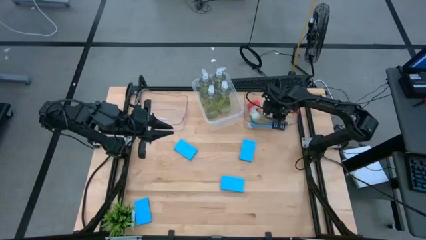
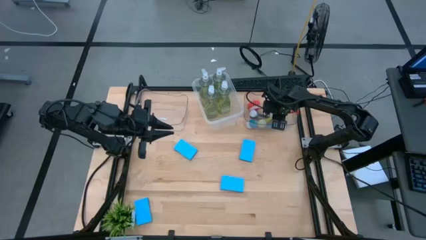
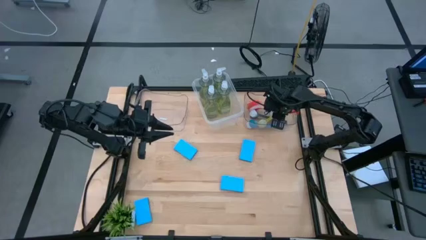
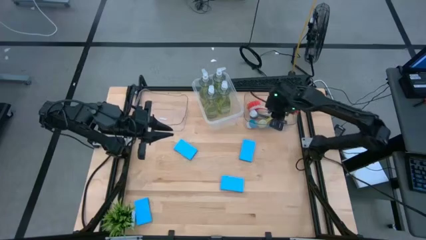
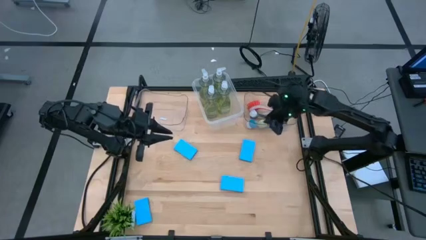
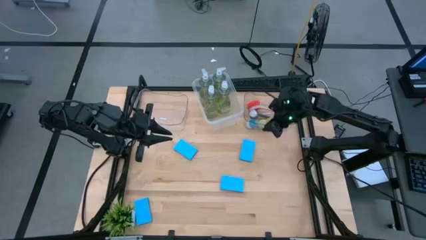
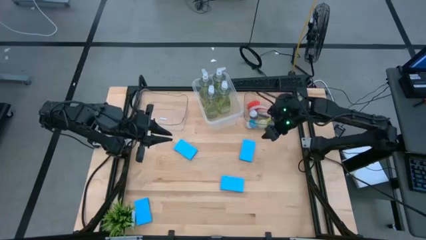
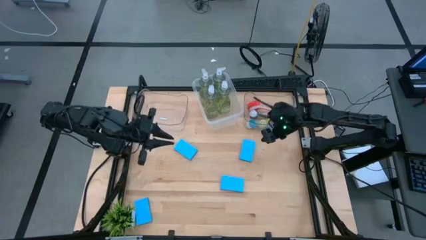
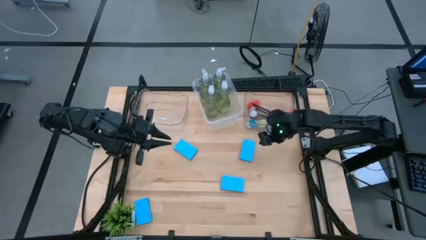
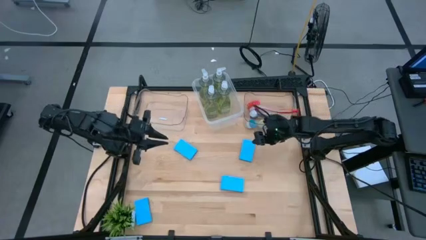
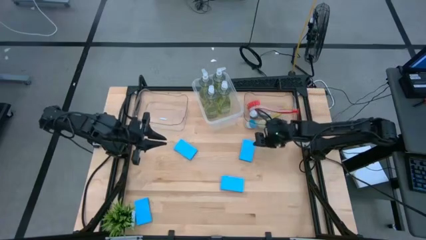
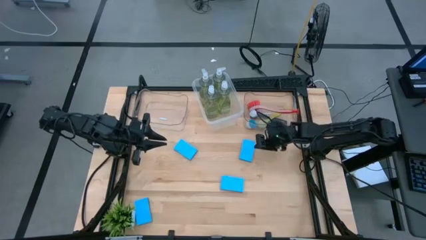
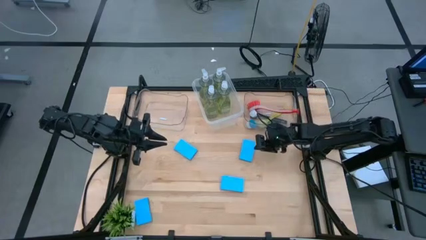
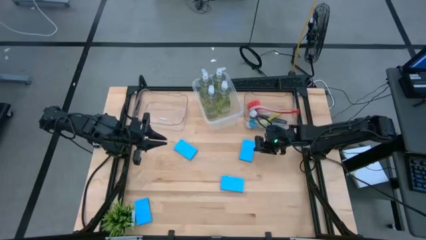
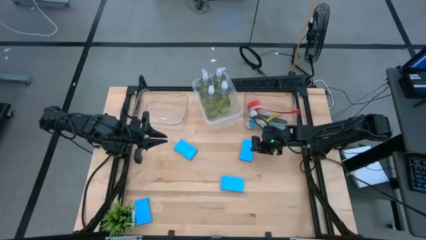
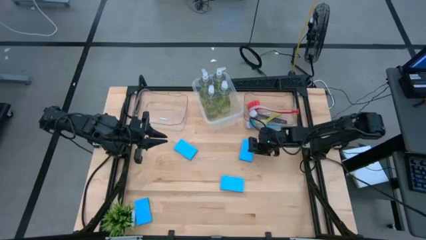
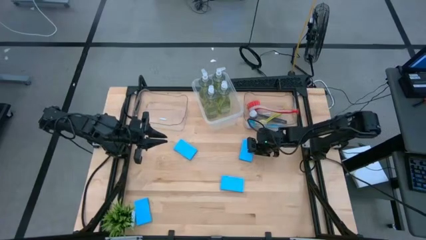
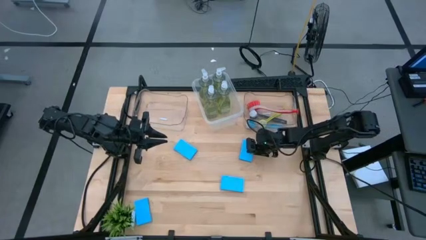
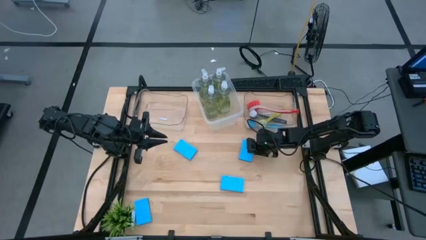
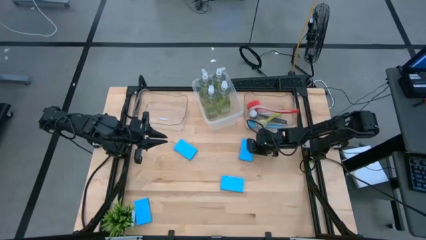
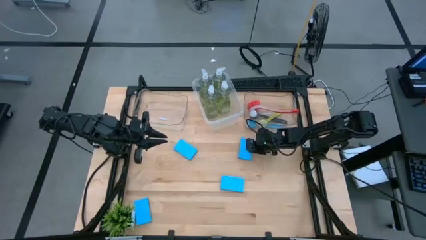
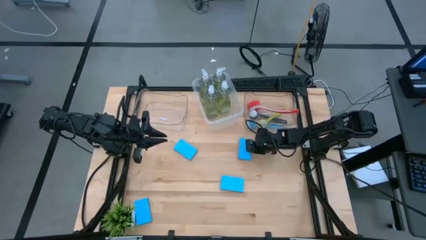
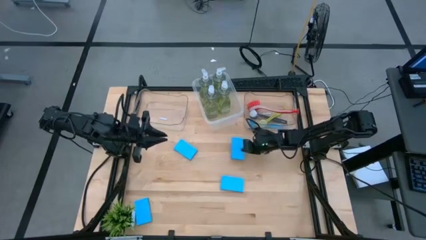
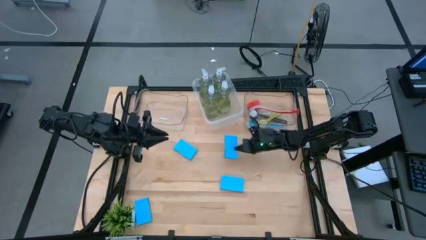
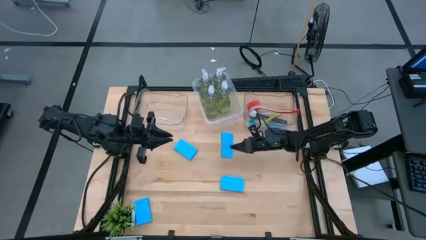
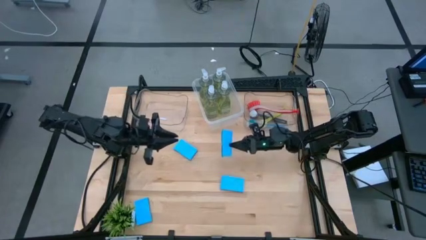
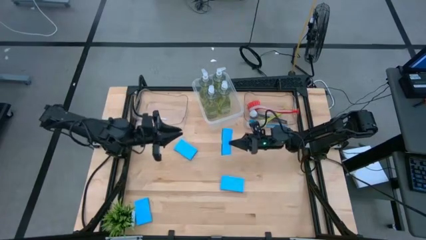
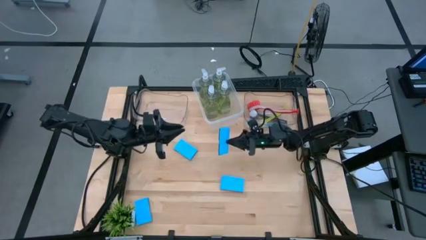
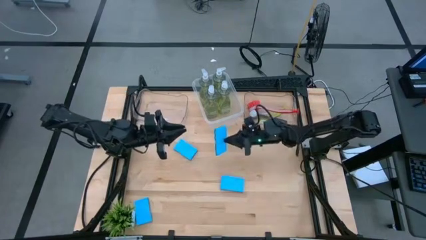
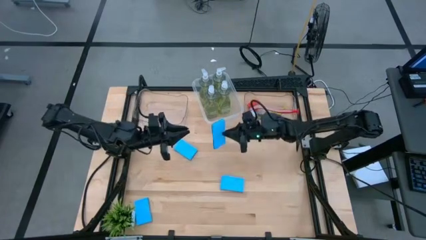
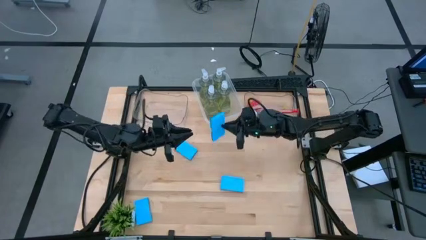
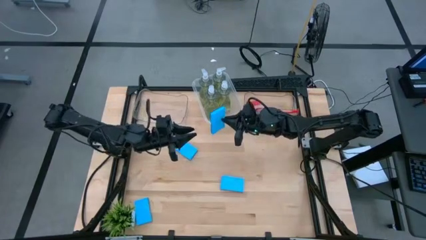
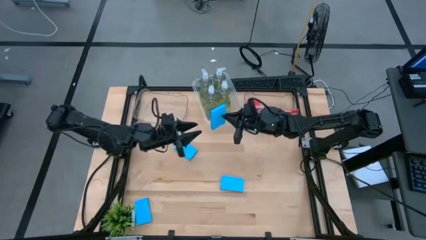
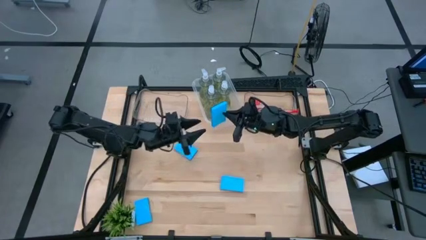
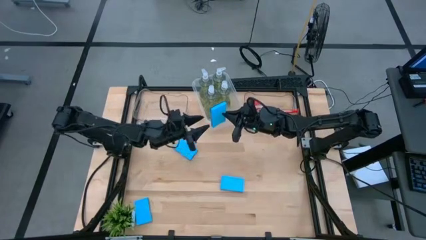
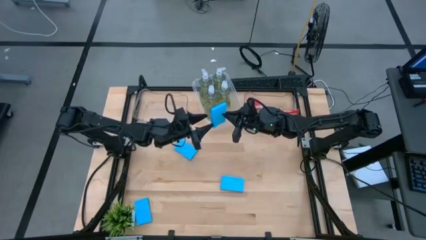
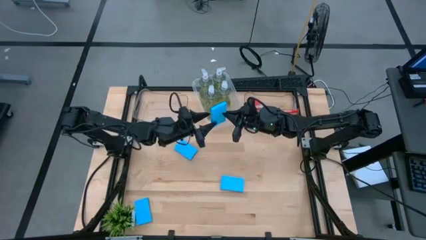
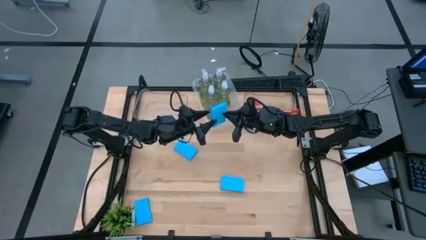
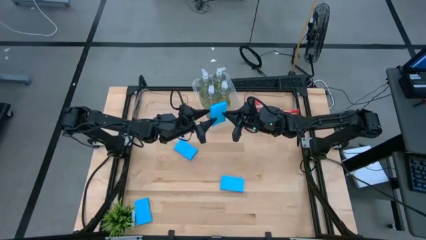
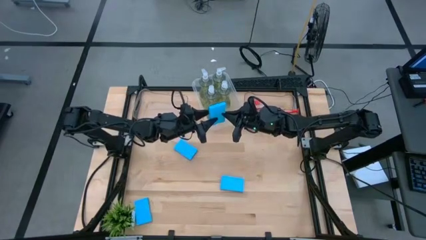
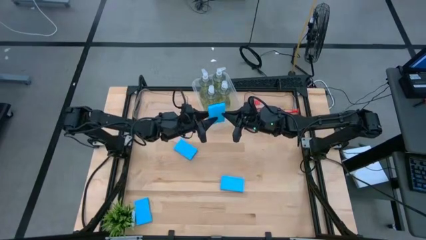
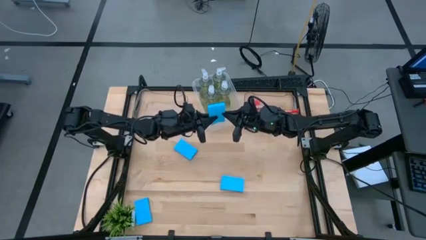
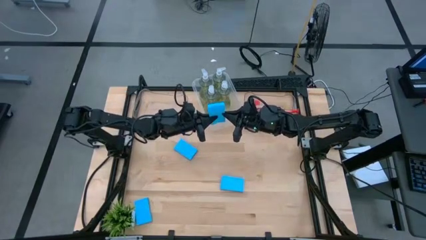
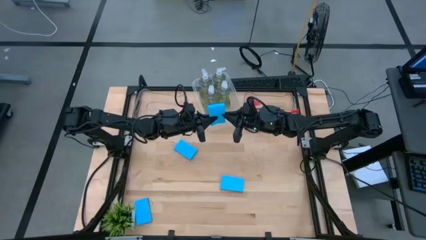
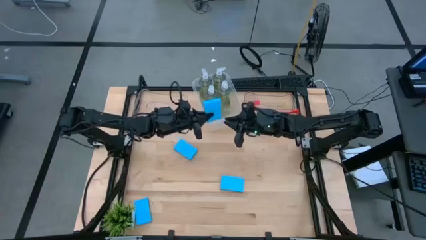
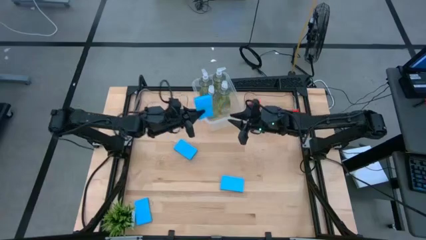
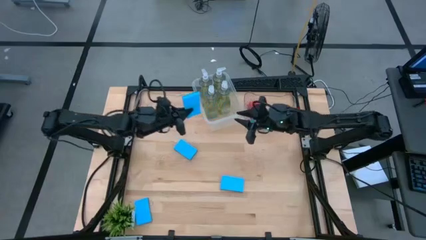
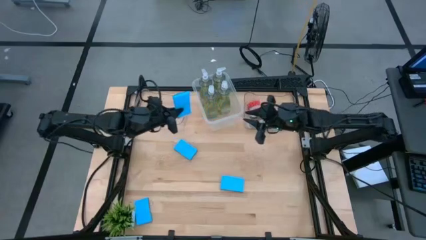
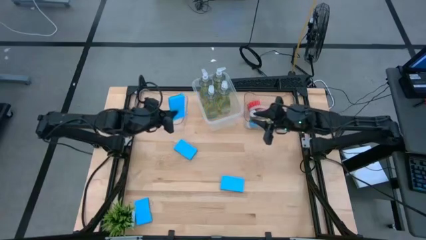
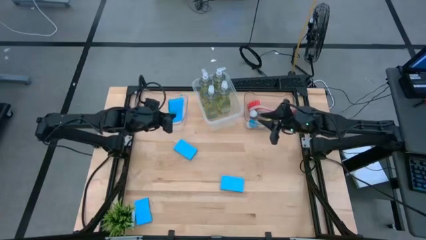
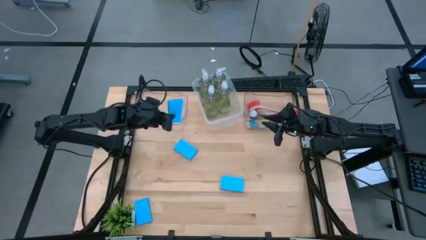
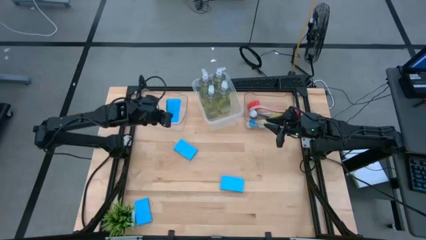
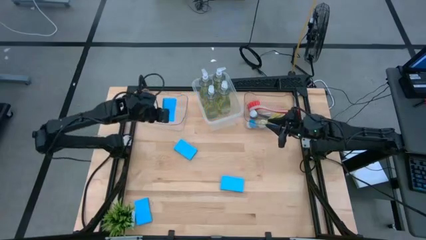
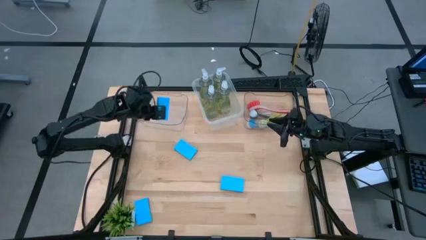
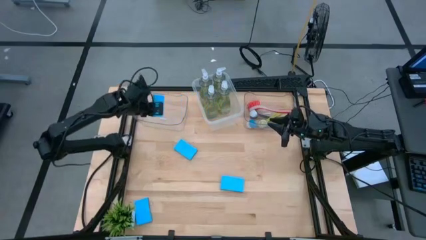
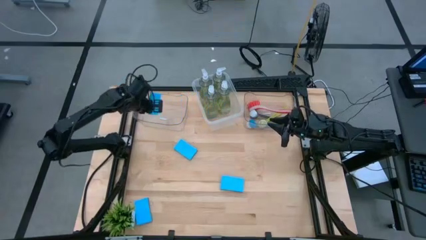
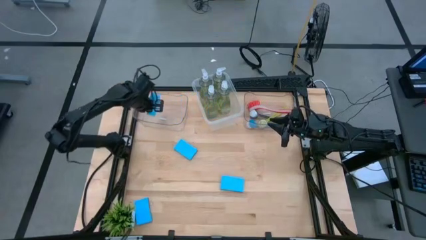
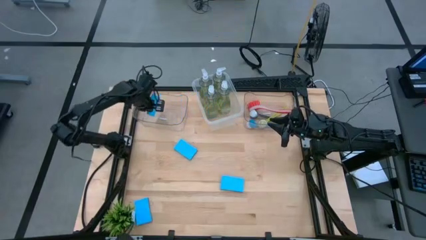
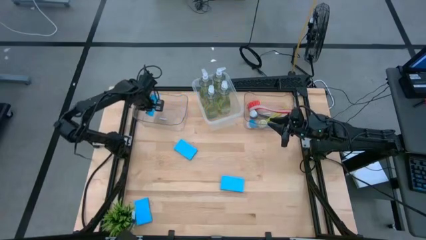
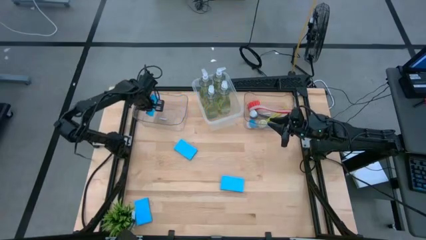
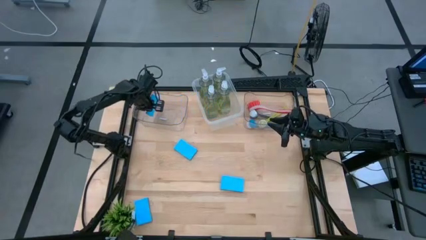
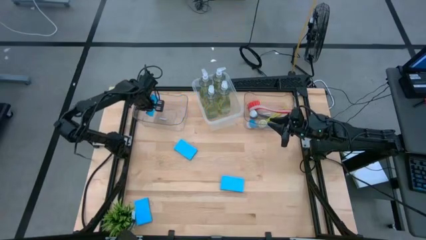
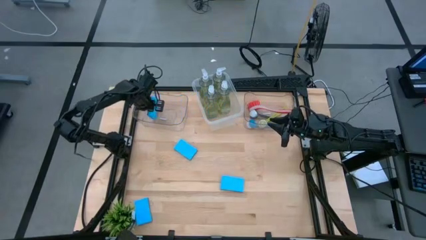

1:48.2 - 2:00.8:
Task: Pick & Place Kitchen Sink Supplies
Put the blue sponge into the left transparent bin
